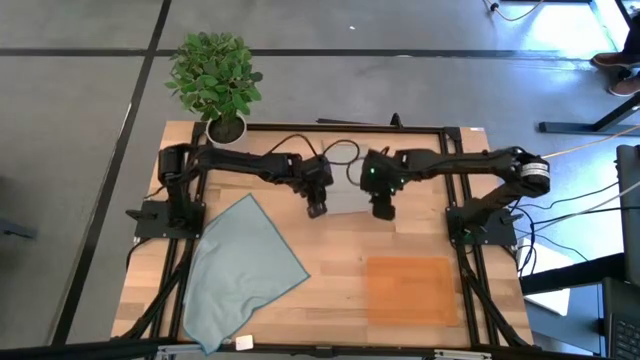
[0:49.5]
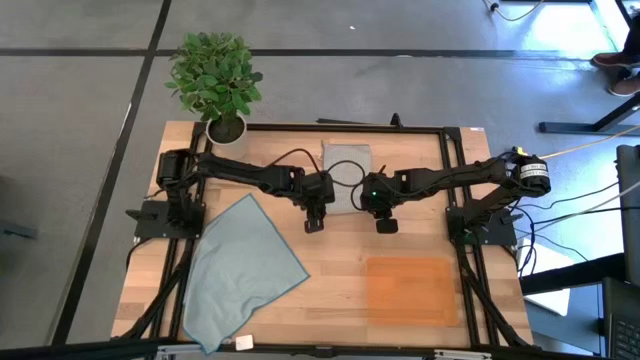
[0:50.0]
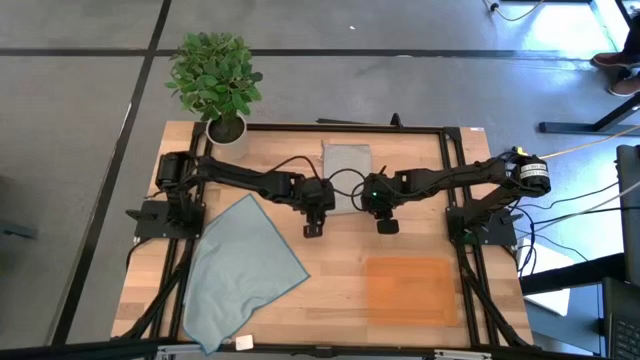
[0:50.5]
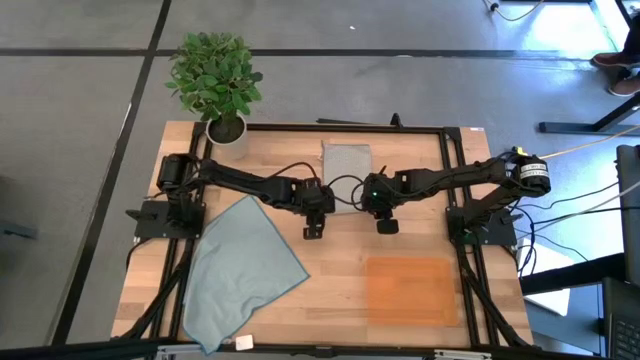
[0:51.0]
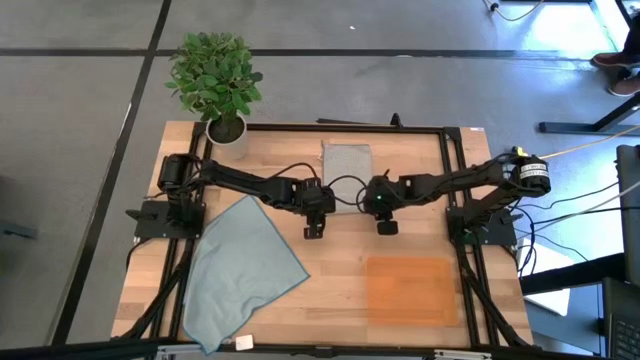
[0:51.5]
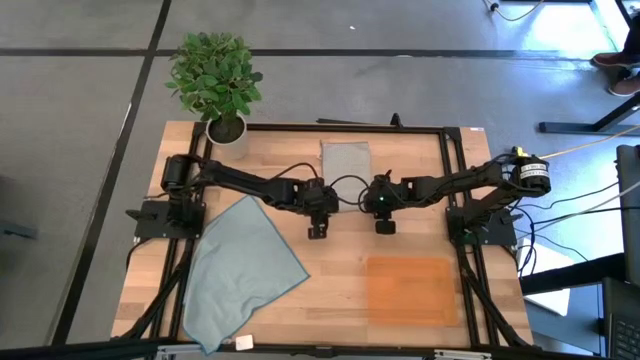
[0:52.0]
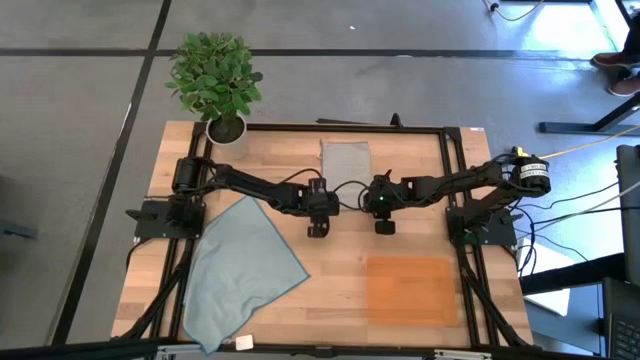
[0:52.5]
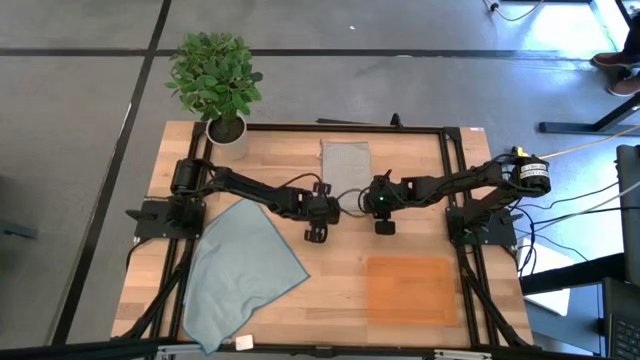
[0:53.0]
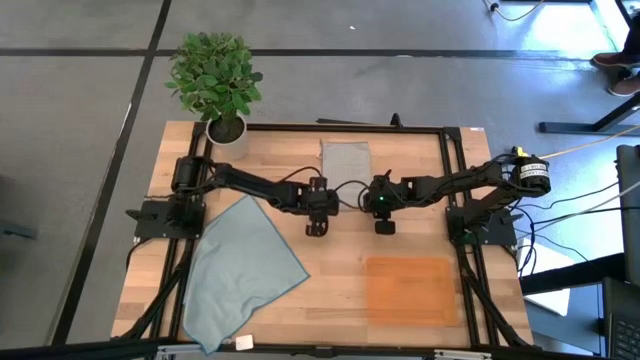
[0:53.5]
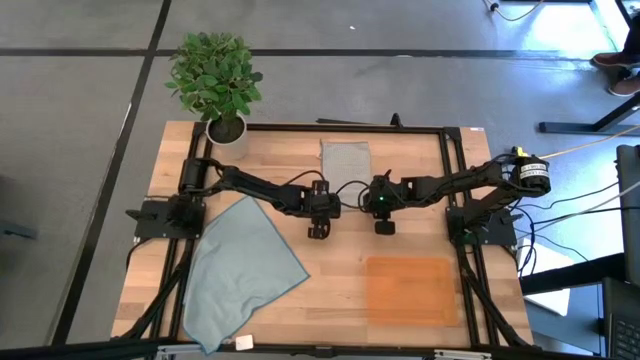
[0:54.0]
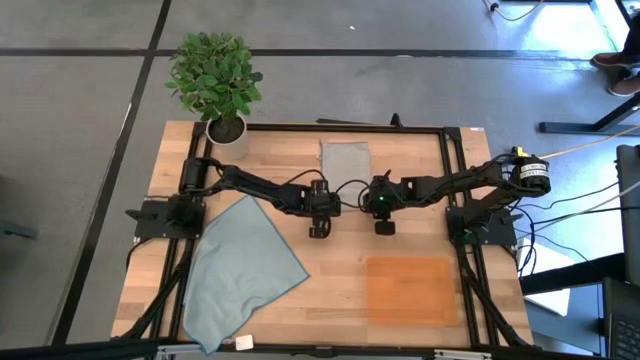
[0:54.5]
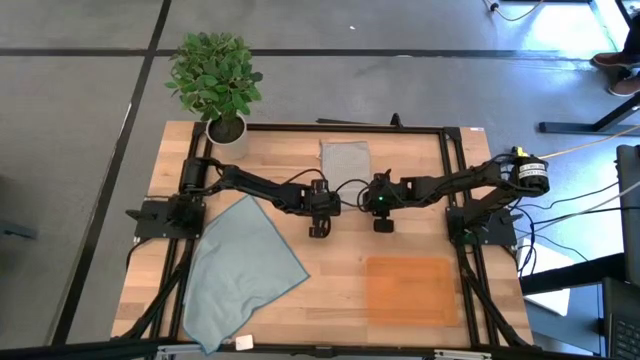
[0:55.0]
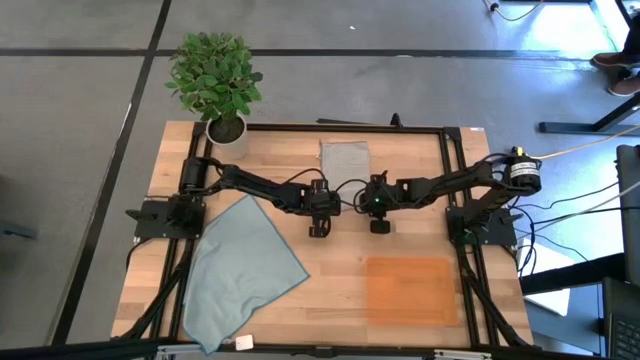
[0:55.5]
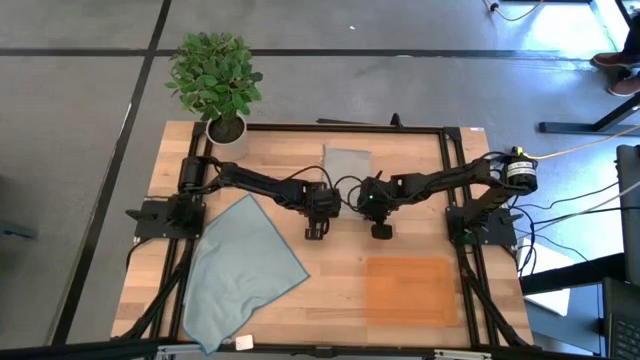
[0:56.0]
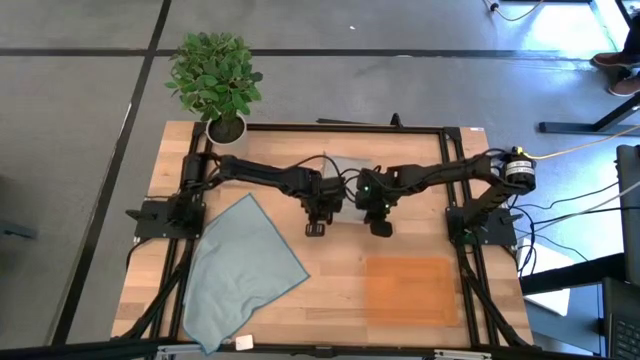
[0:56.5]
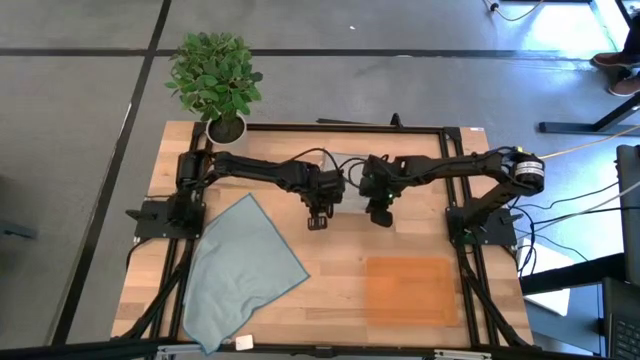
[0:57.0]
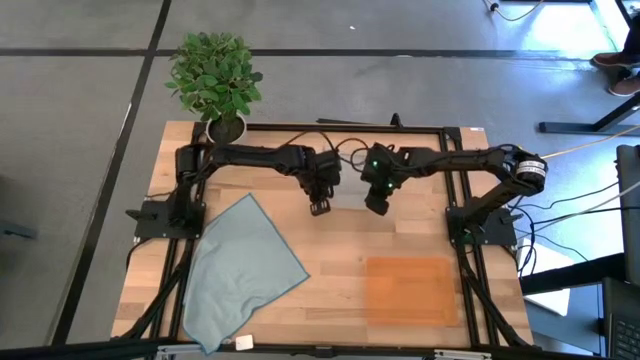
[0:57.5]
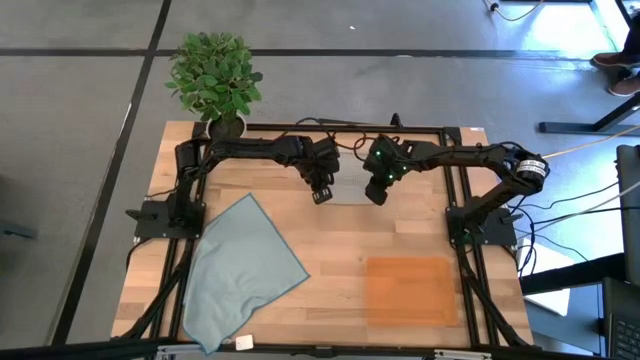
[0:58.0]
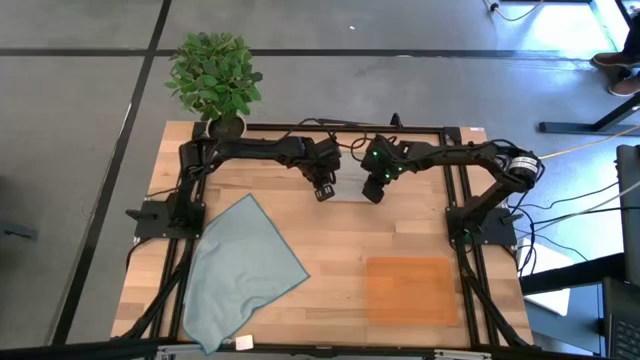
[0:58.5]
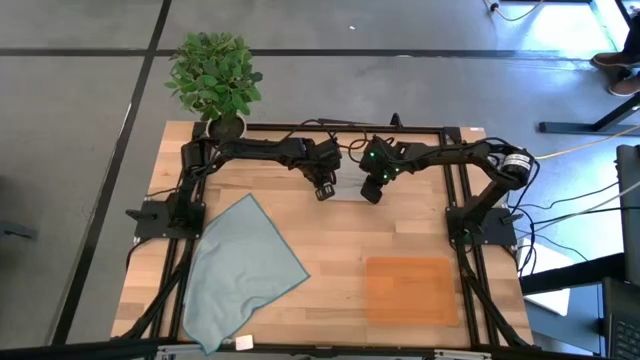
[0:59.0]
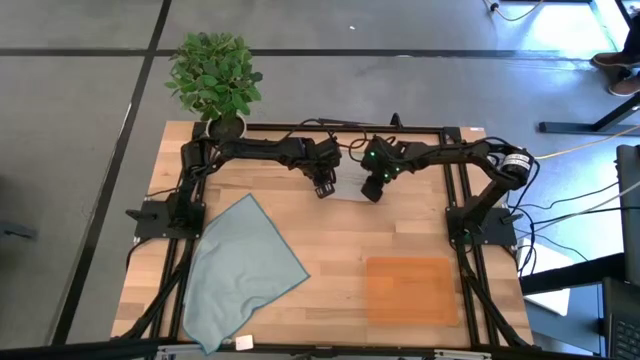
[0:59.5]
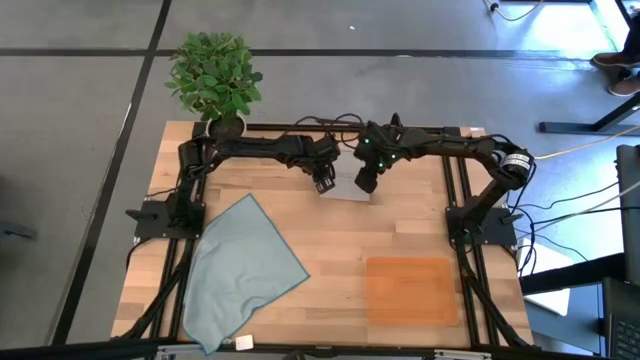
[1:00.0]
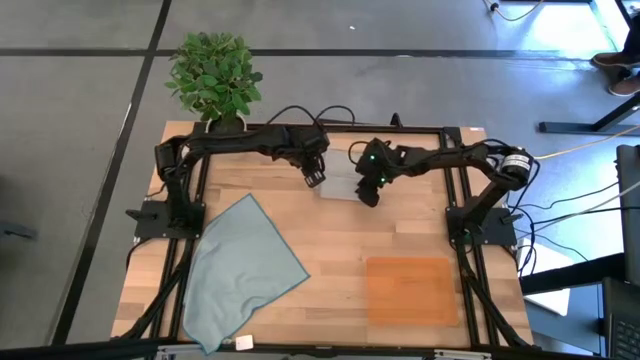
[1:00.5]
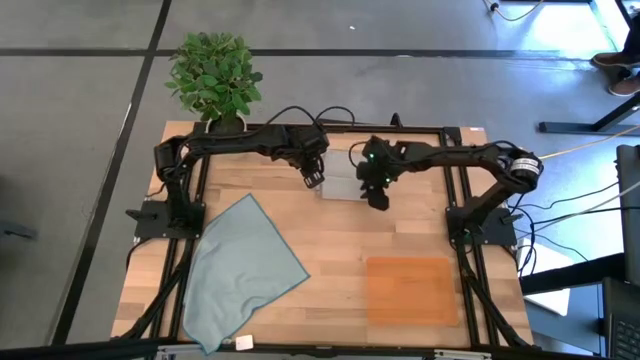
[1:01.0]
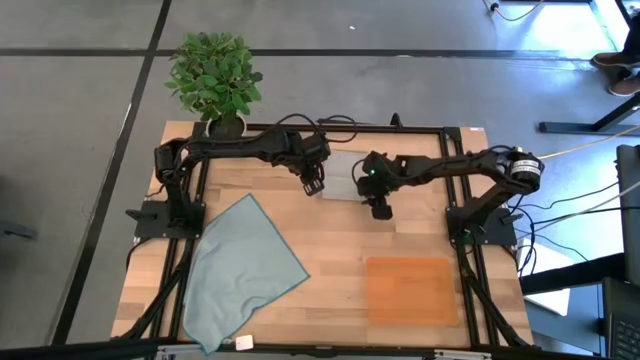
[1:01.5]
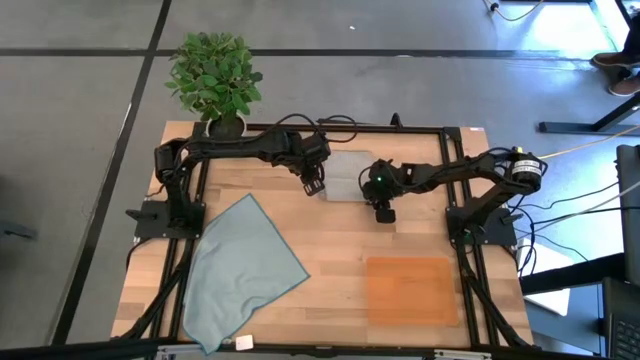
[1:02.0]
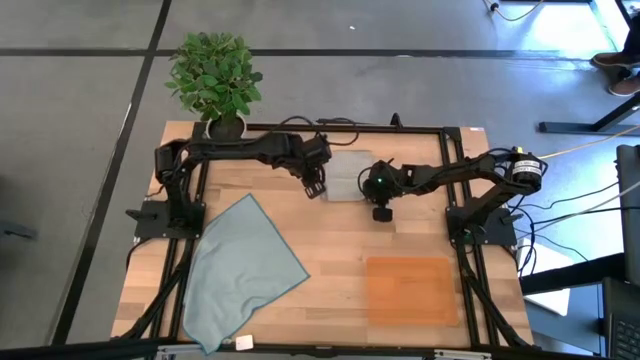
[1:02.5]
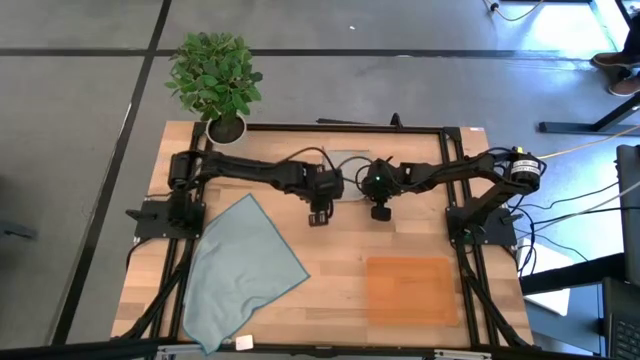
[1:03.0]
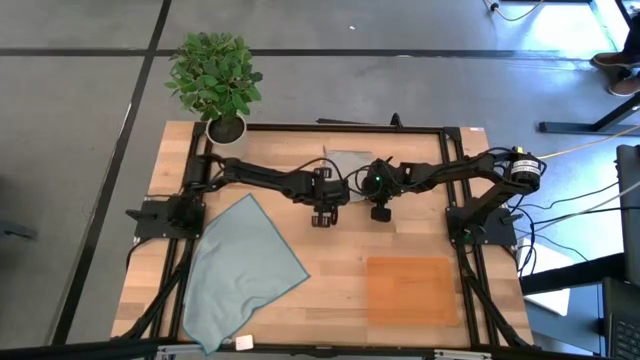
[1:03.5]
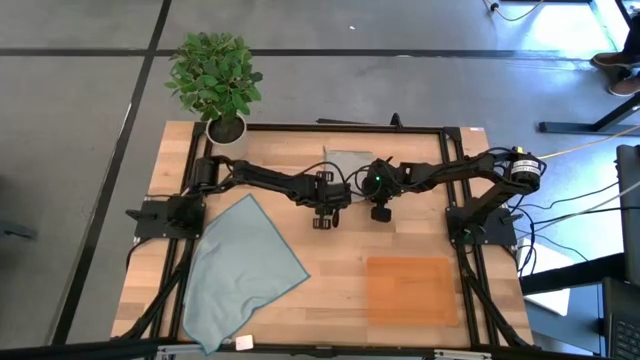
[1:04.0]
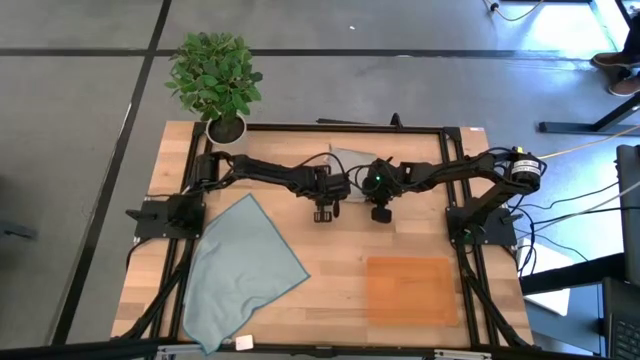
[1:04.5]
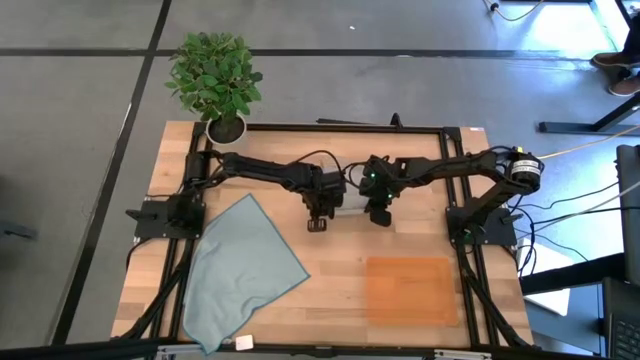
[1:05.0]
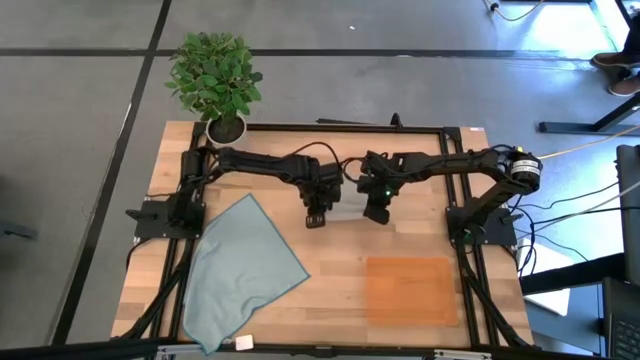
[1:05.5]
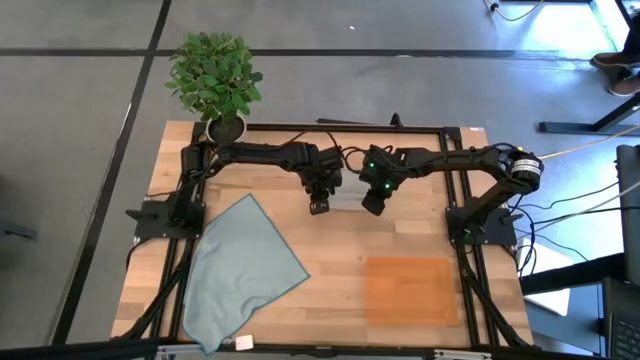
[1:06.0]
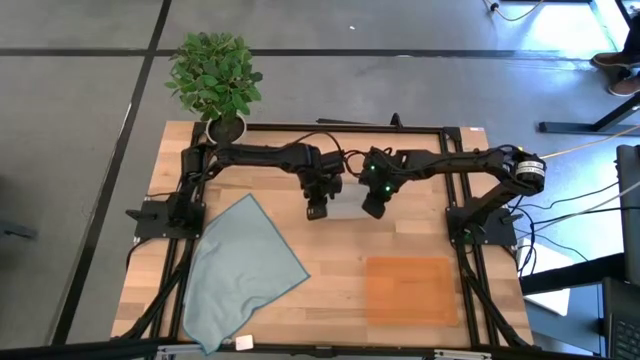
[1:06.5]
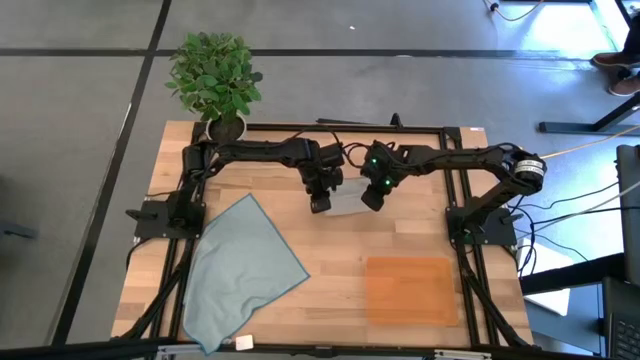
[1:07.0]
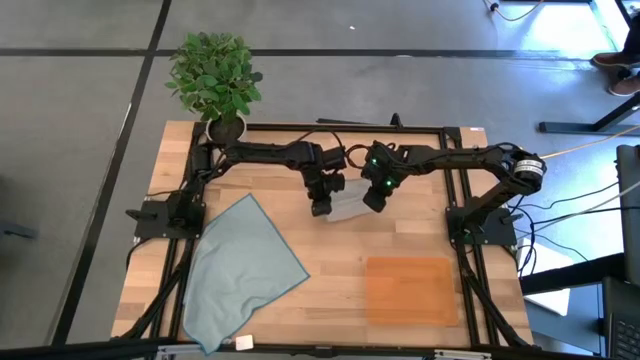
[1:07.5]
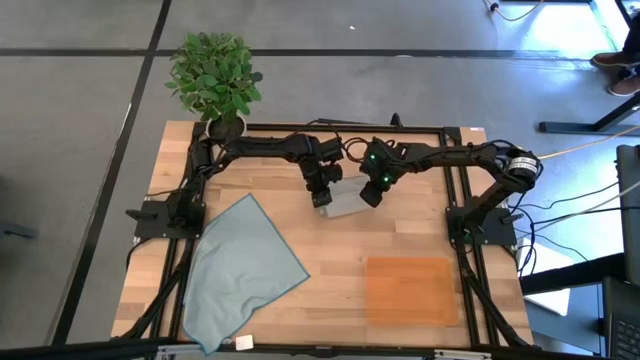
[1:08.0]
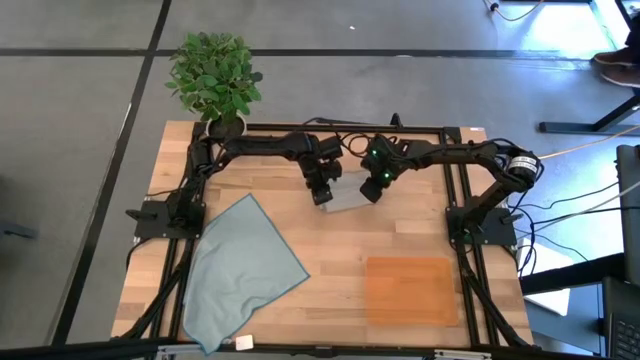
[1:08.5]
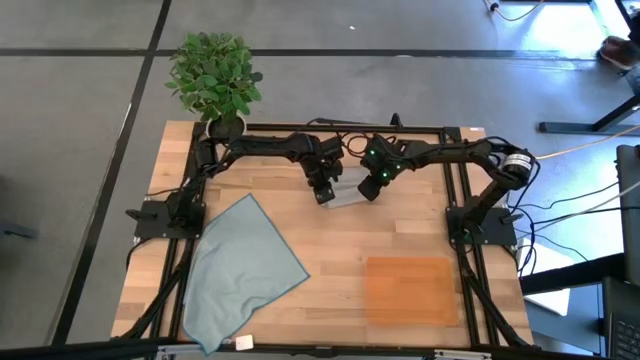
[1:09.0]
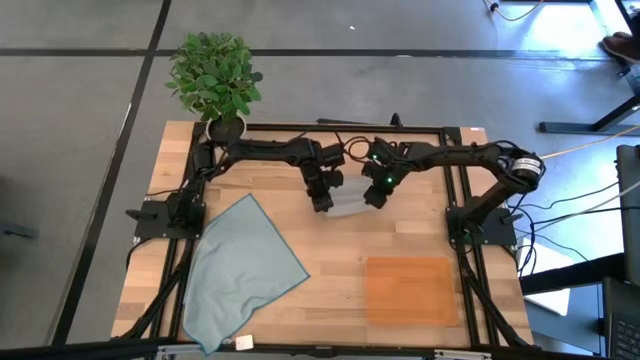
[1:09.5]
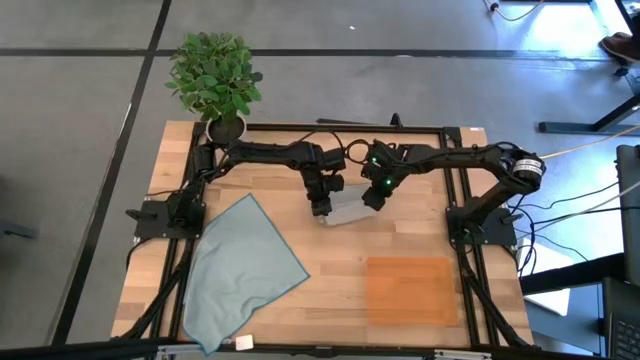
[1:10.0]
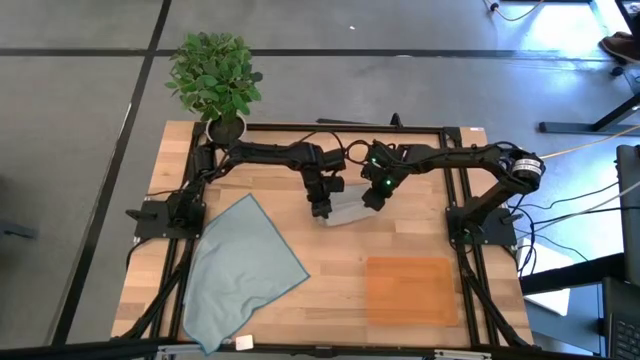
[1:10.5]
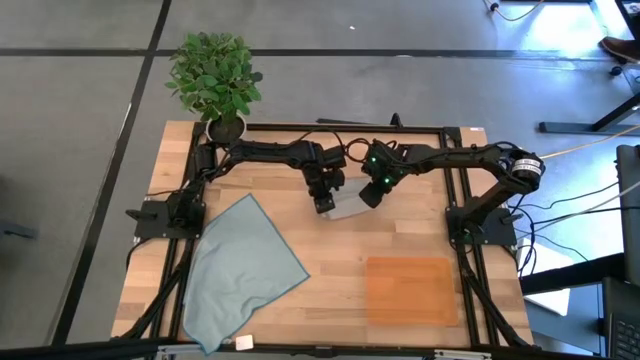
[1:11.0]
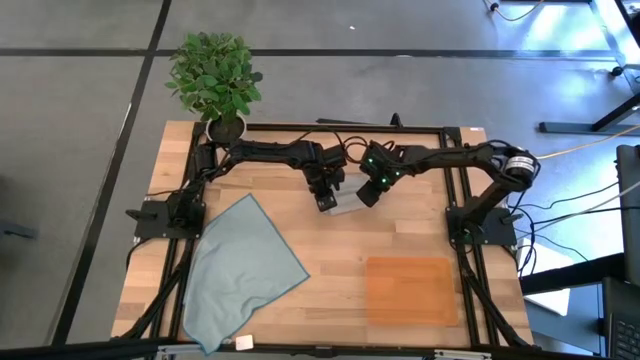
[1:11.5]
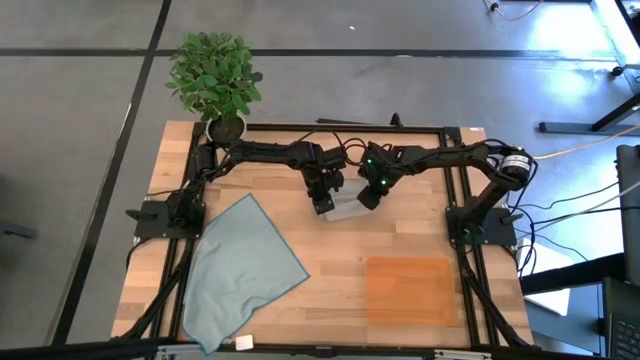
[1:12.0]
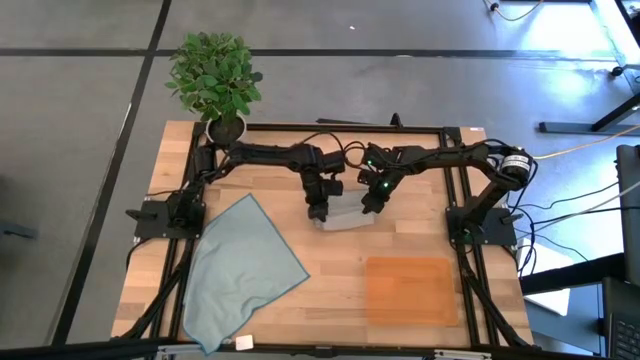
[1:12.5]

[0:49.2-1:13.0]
Task: Roll microfiber towels into tight, uniform cylinder then place into a basket
Roll the gray microfiber towel
